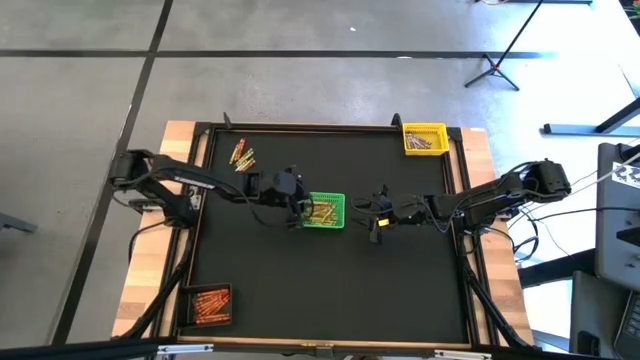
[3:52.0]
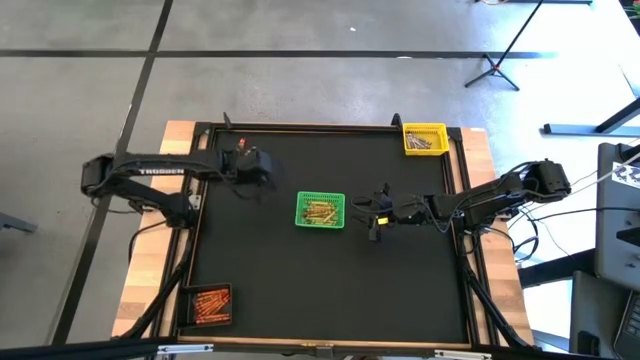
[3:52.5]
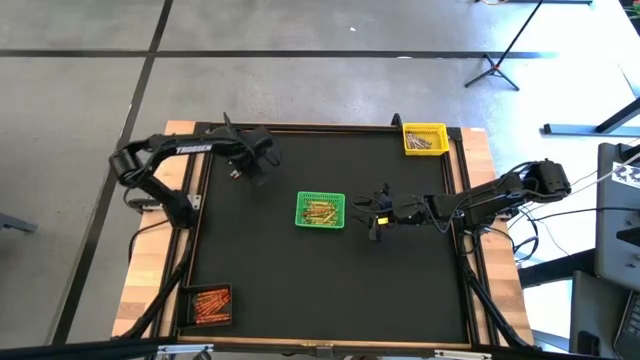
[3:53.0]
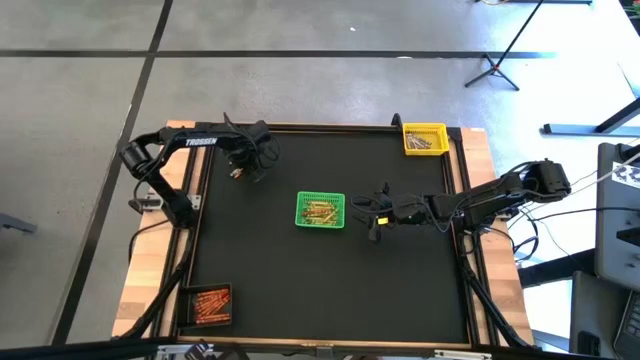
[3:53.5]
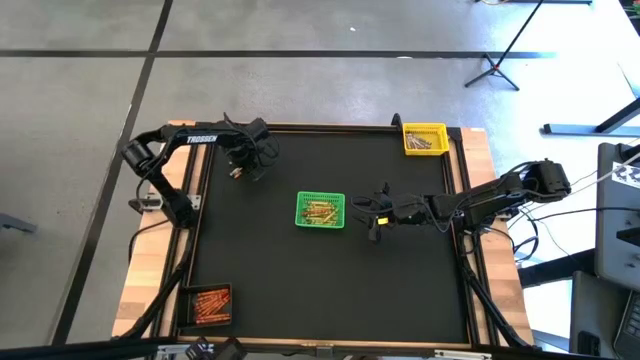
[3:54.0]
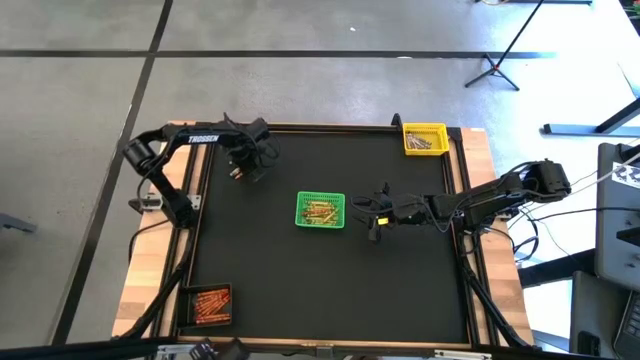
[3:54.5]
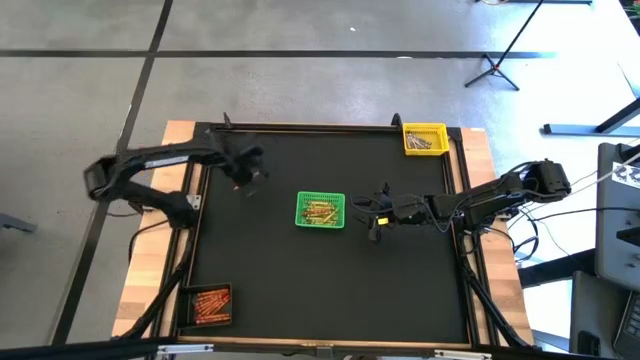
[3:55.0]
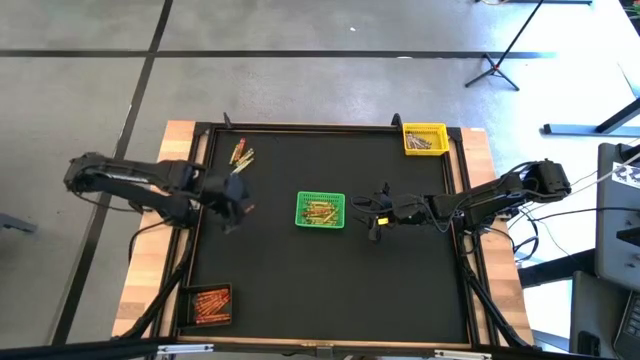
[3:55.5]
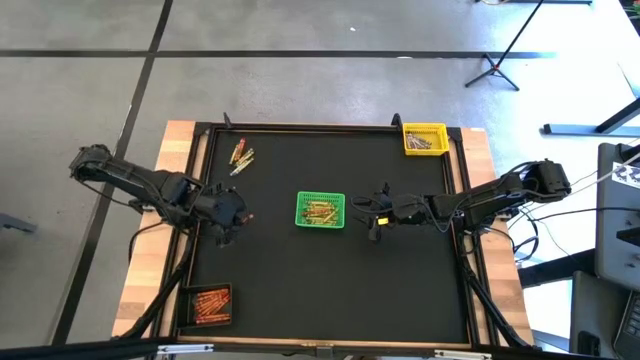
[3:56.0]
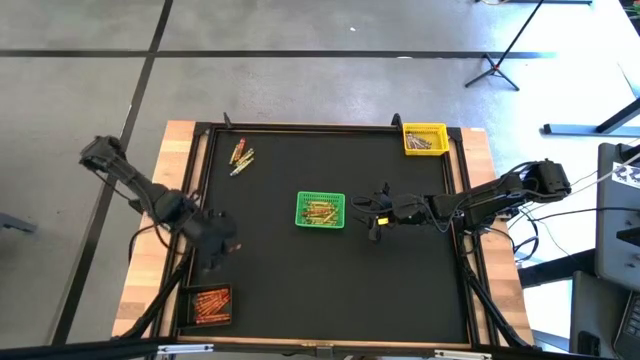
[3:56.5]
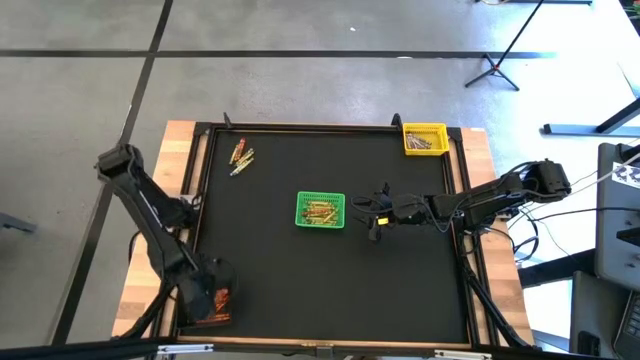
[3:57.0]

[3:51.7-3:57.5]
Task: Sort crayons
Put the orange crayon into the black bin

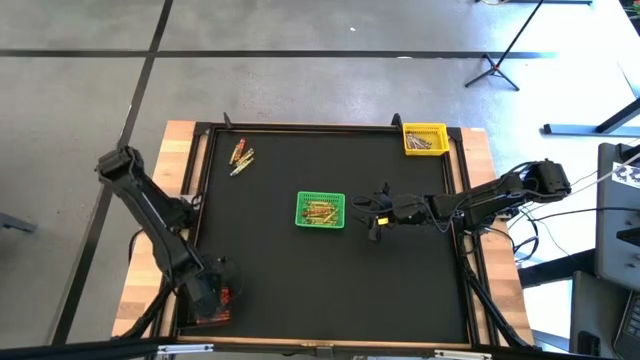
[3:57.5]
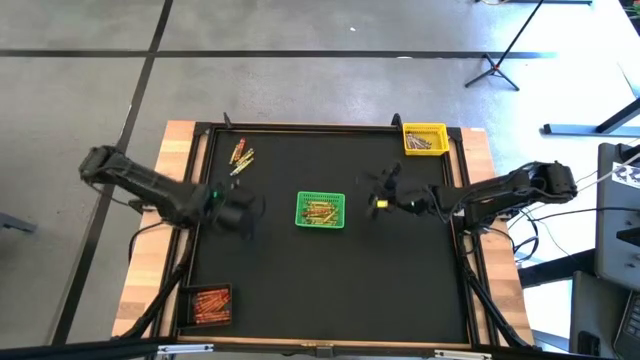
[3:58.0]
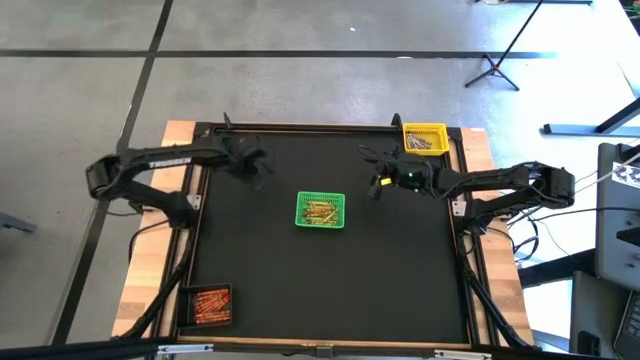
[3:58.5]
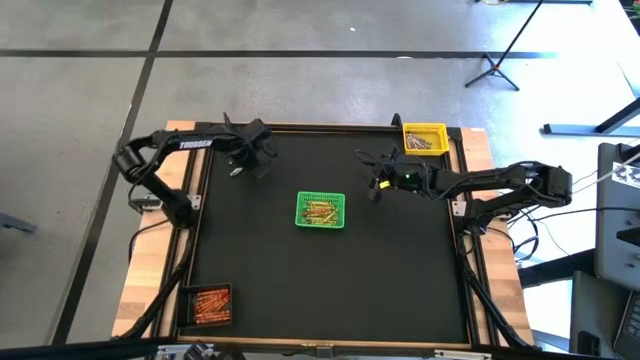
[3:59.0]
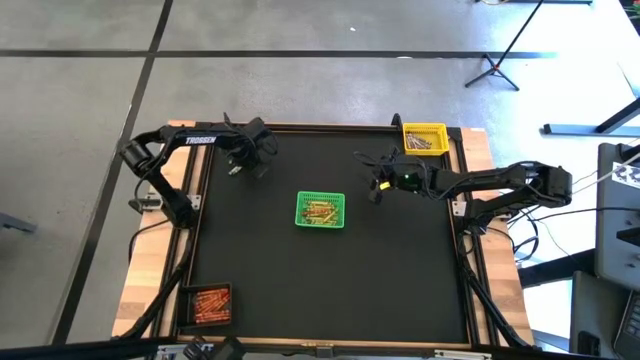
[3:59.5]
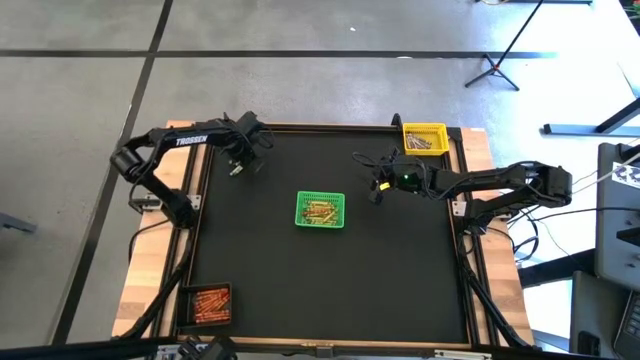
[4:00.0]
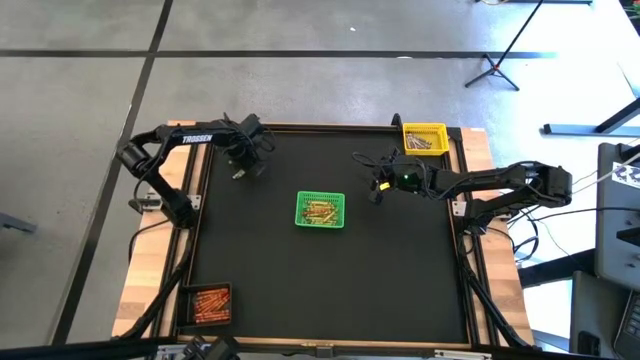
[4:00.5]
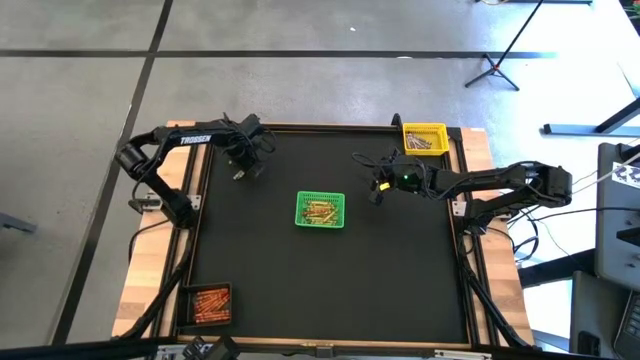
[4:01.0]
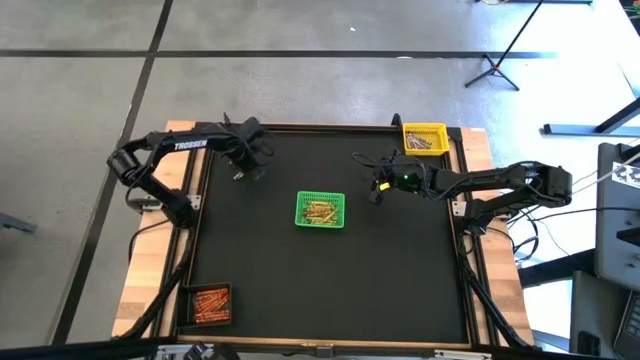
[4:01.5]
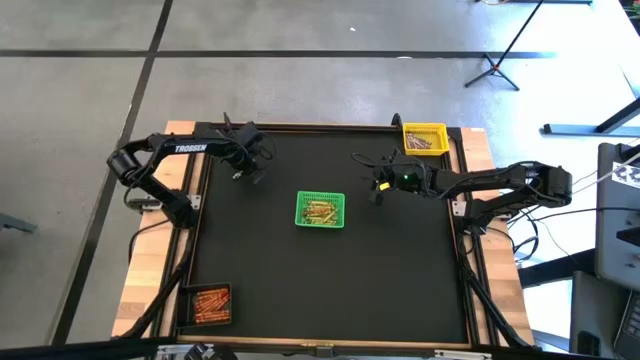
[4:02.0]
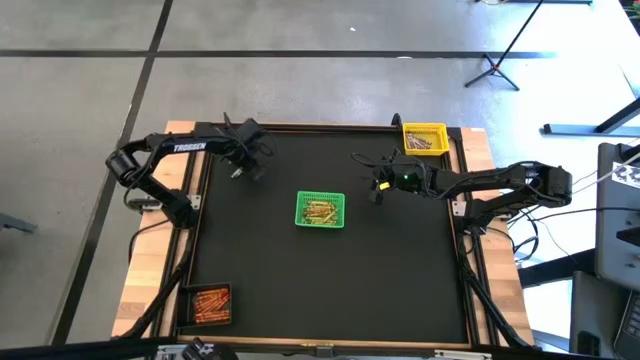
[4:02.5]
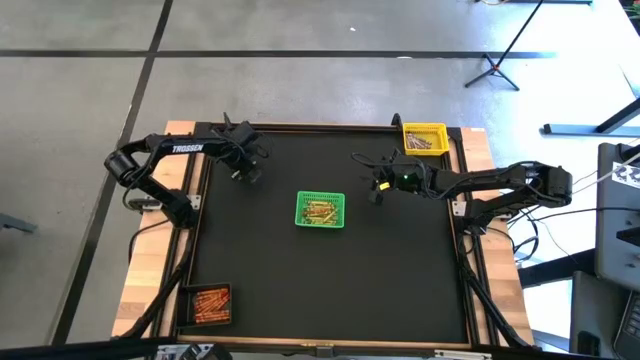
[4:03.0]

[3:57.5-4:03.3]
Put the green crayon into the green bin

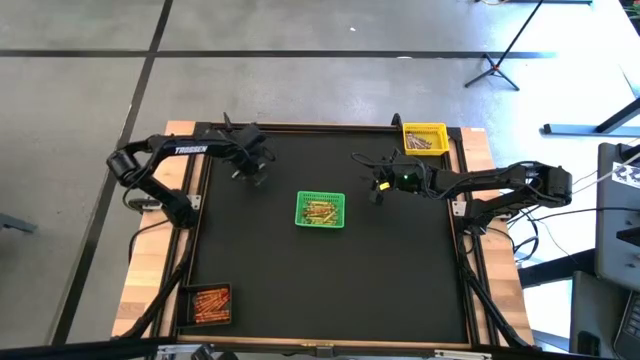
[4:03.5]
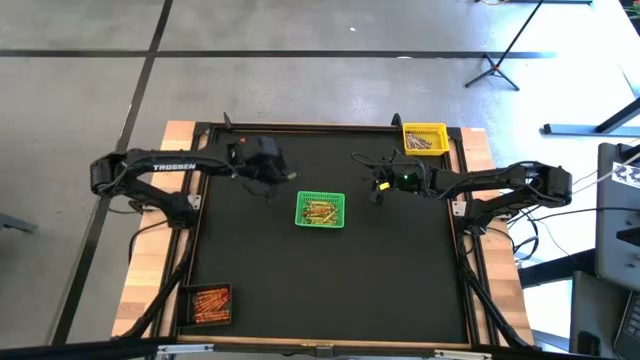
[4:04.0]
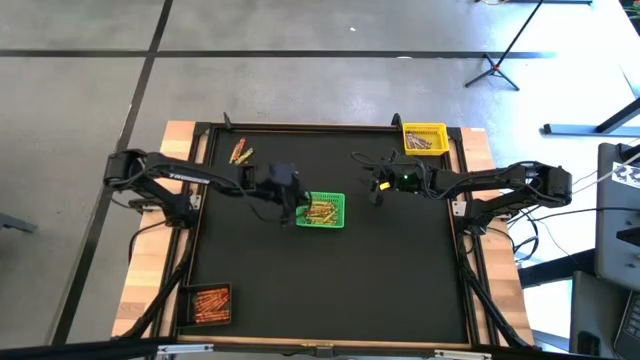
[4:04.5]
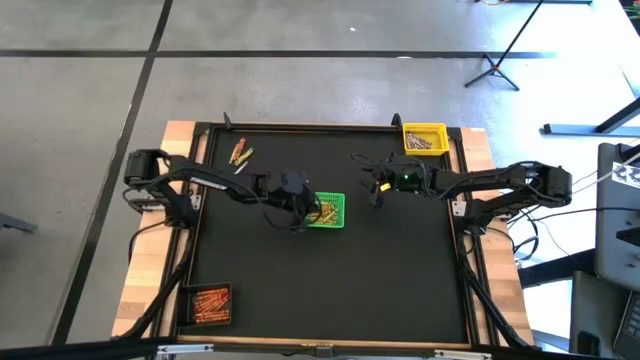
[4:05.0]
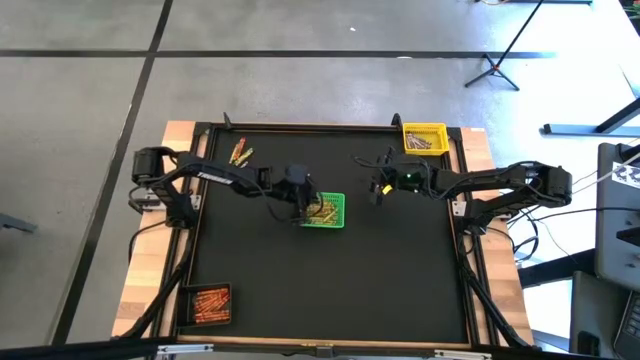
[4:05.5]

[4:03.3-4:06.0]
Put the green crayon into the green bin

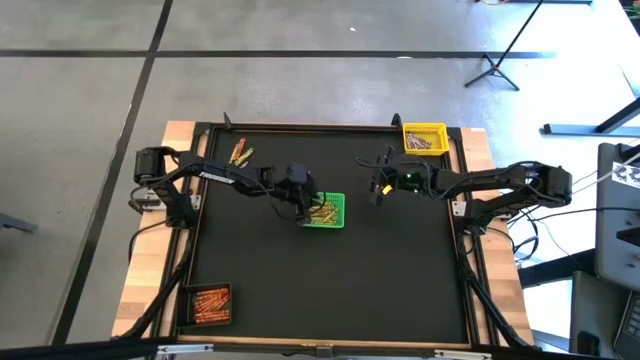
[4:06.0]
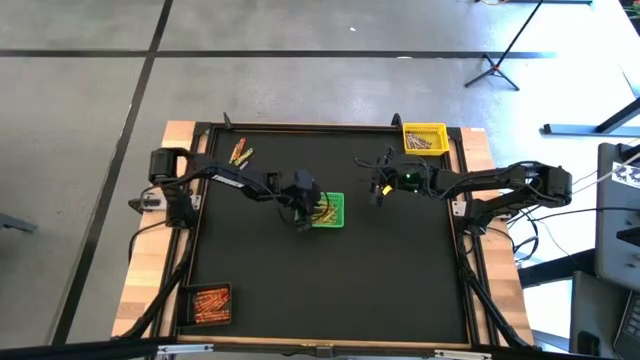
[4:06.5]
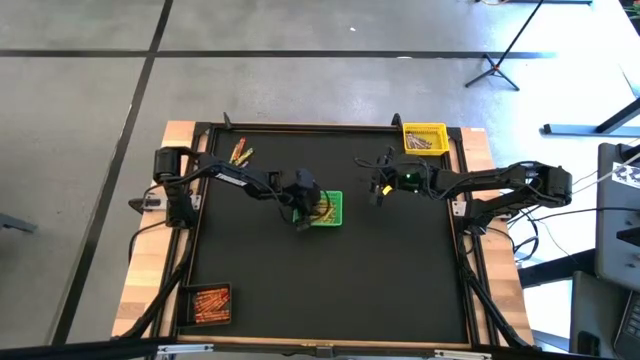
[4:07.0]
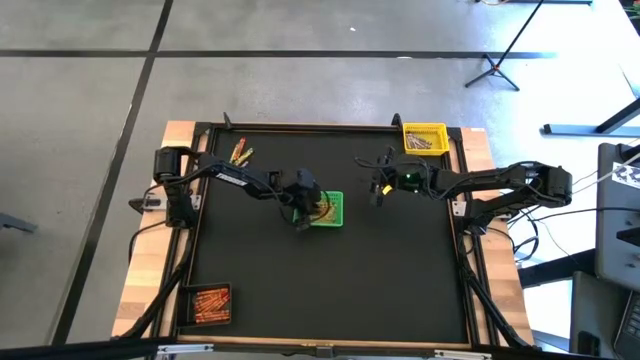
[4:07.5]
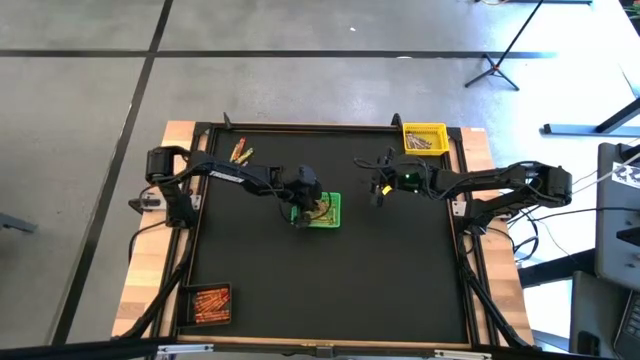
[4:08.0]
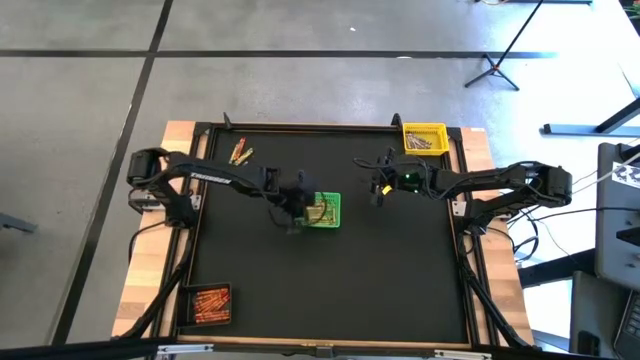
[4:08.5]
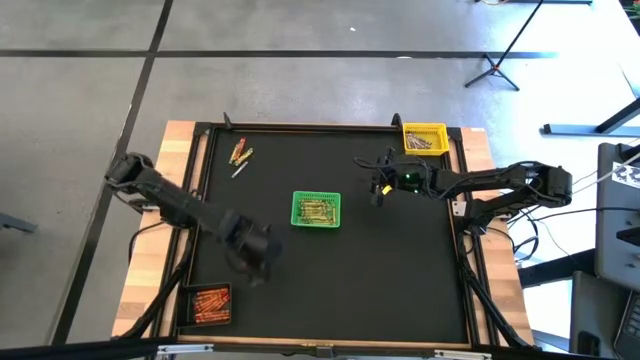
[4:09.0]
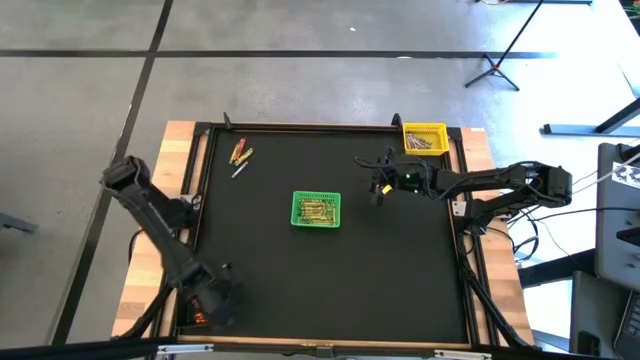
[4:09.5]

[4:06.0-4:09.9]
Put the orange crayon into the black bin

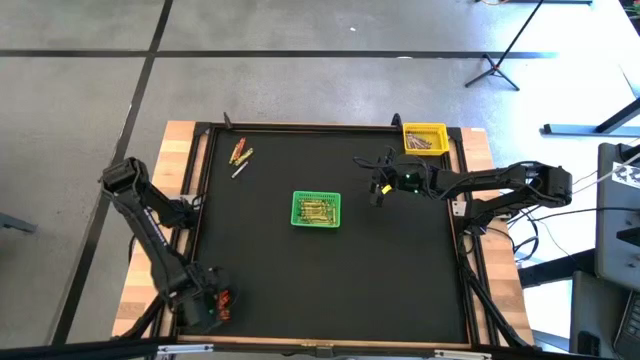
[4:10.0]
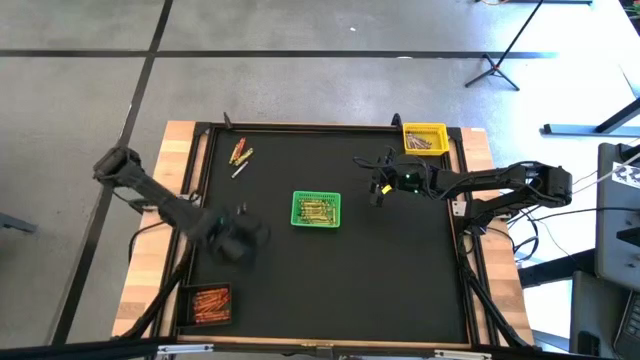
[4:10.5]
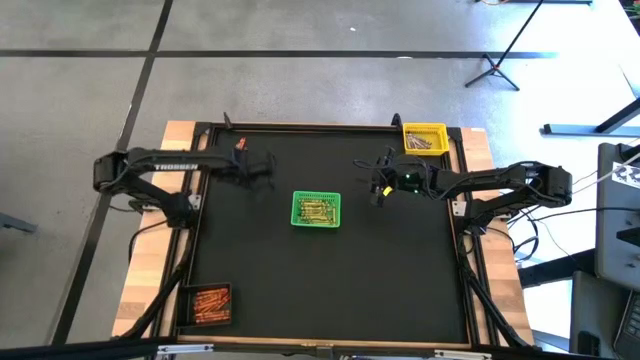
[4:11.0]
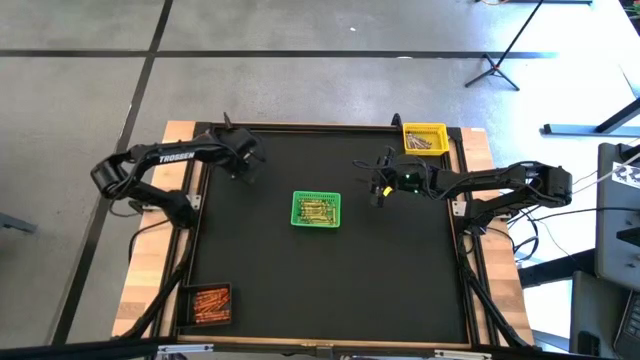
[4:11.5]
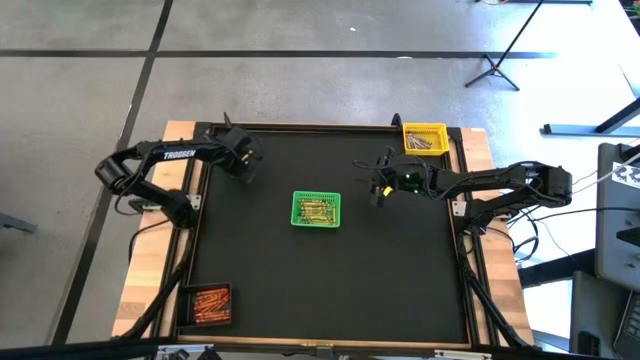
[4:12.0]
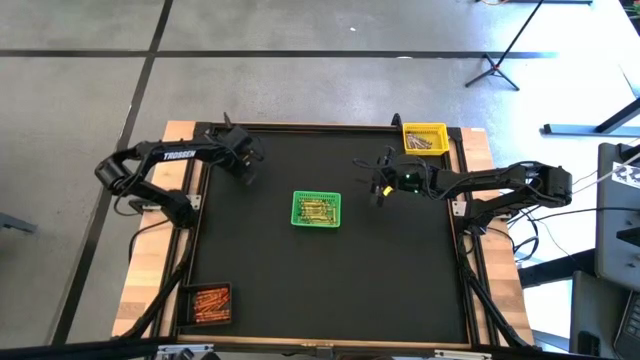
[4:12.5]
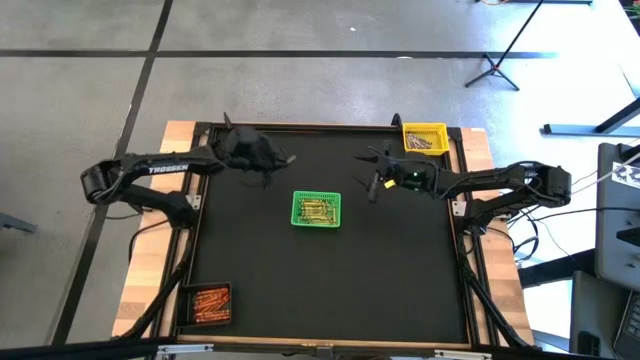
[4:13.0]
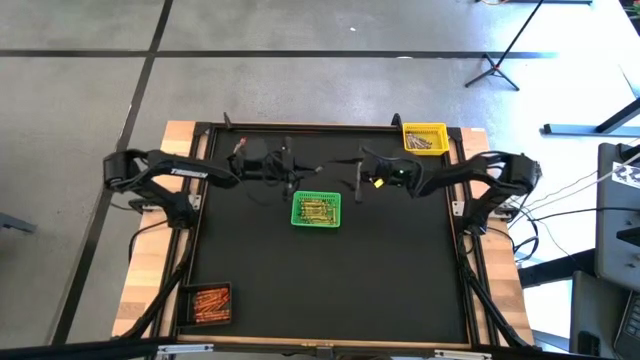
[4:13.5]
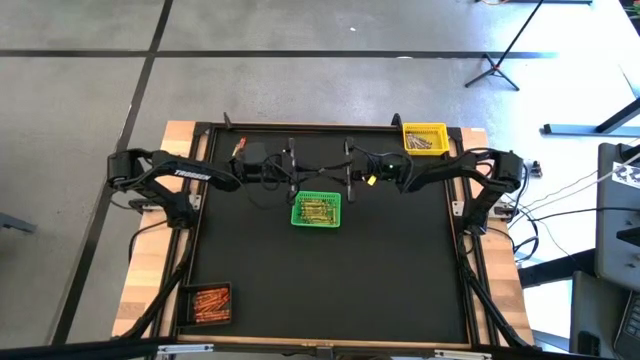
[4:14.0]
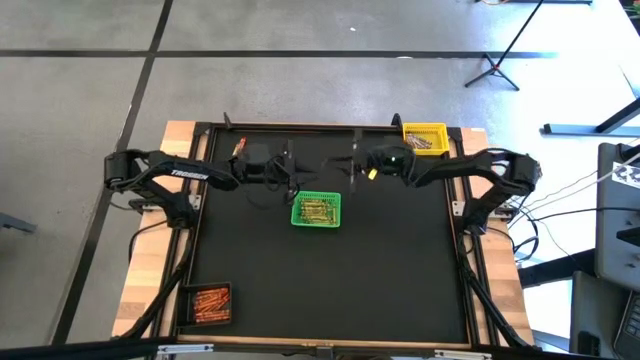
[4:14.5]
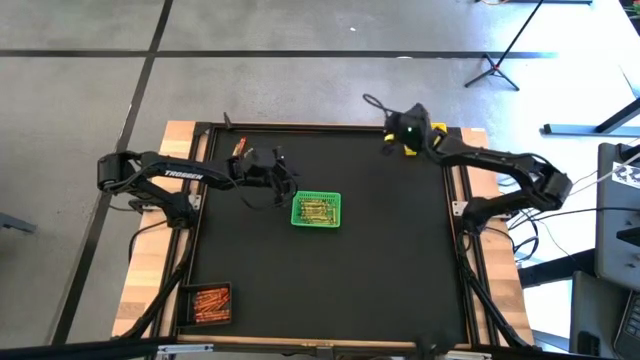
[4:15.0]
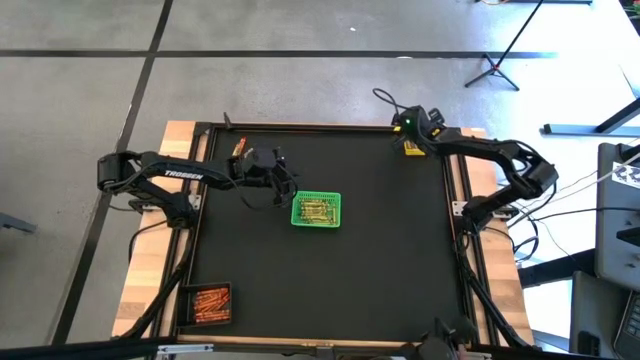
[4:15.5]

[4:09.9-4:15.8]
Put the black crayon into the yellow bin
